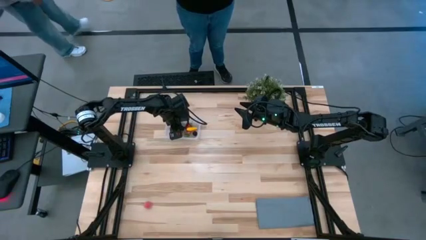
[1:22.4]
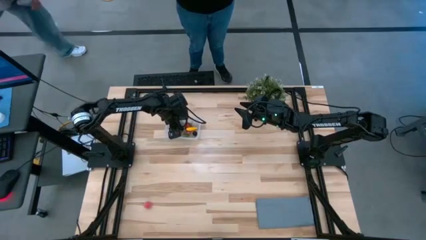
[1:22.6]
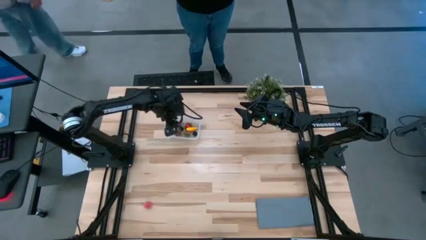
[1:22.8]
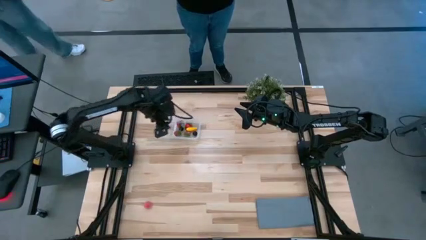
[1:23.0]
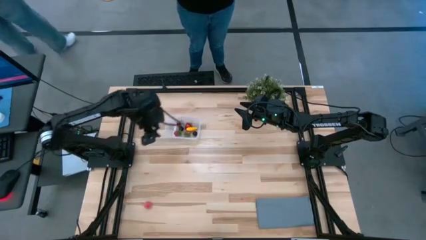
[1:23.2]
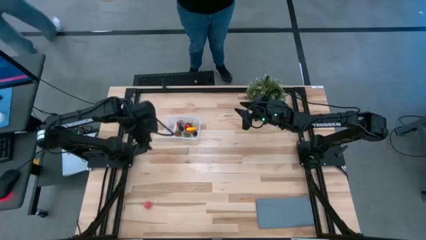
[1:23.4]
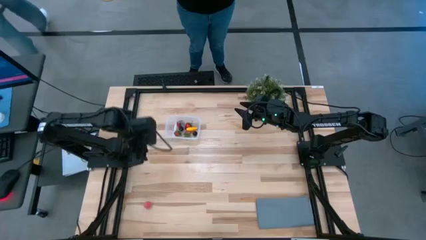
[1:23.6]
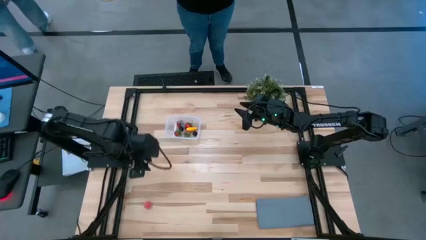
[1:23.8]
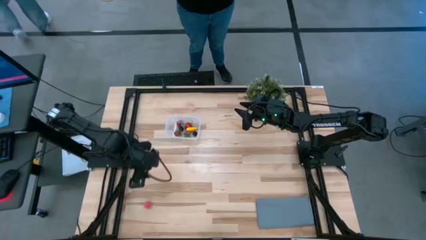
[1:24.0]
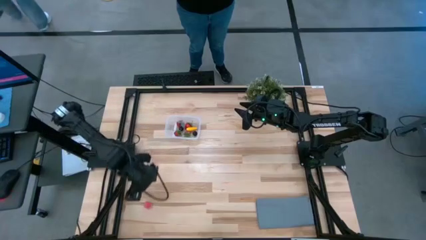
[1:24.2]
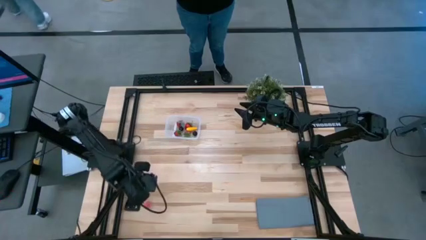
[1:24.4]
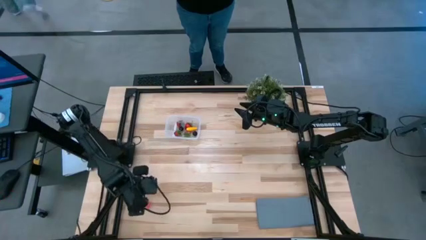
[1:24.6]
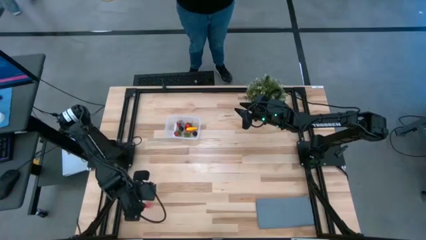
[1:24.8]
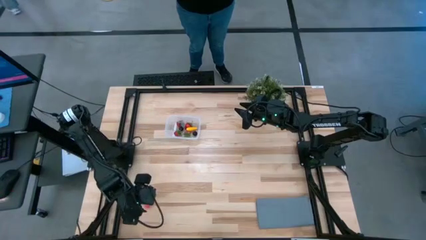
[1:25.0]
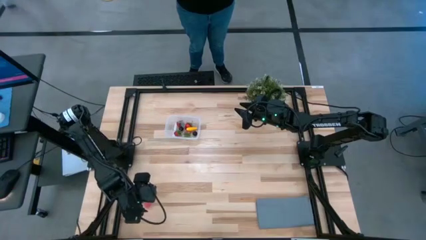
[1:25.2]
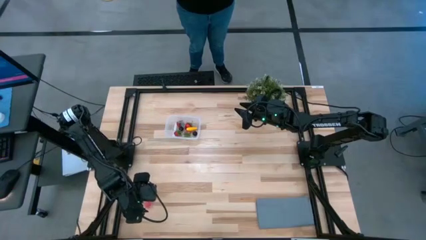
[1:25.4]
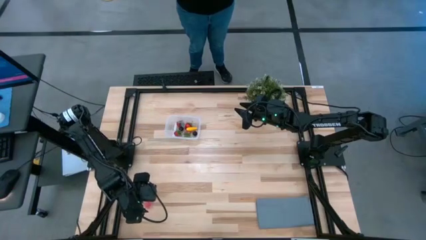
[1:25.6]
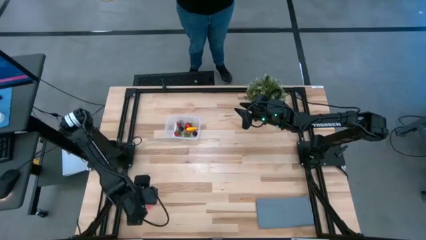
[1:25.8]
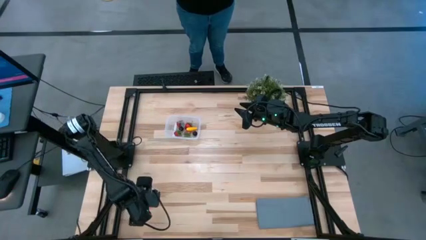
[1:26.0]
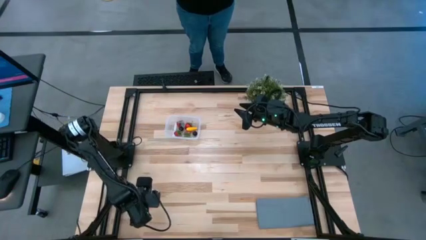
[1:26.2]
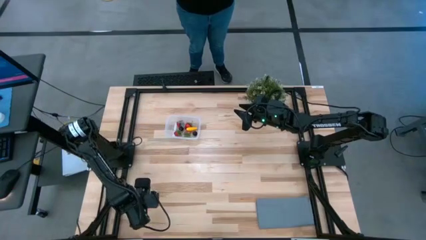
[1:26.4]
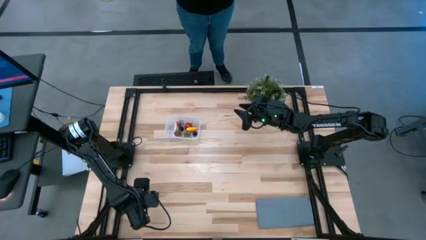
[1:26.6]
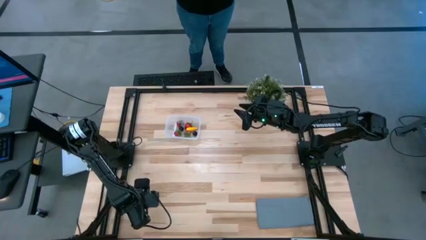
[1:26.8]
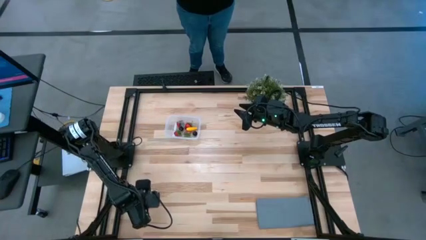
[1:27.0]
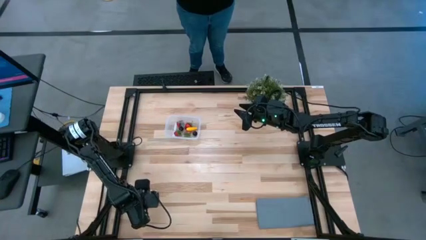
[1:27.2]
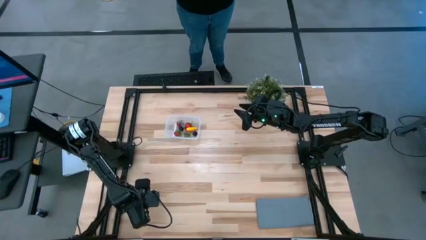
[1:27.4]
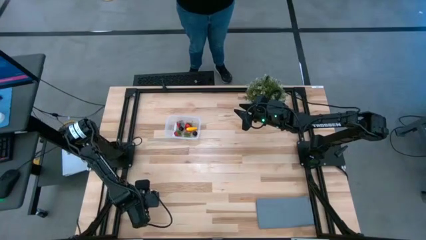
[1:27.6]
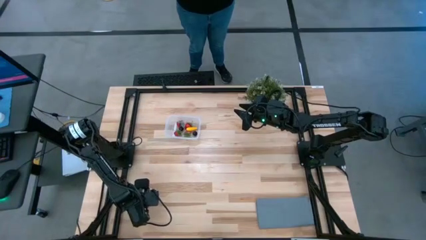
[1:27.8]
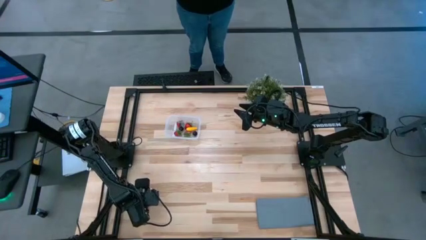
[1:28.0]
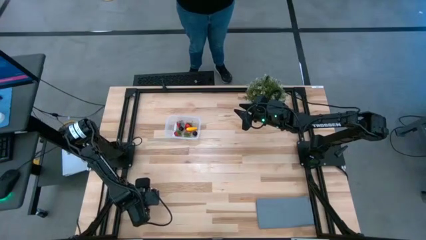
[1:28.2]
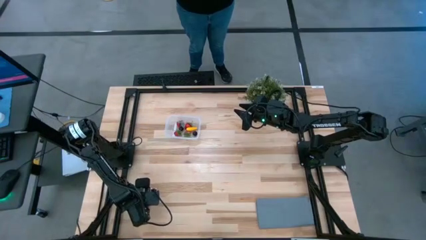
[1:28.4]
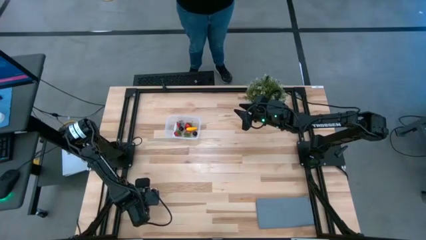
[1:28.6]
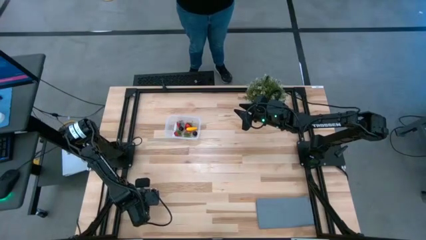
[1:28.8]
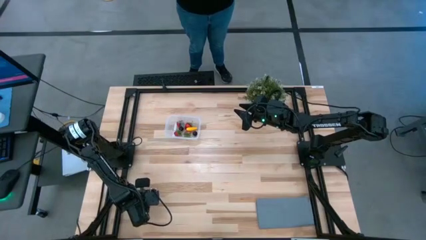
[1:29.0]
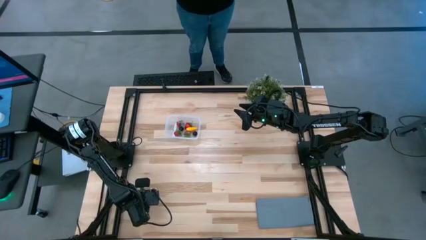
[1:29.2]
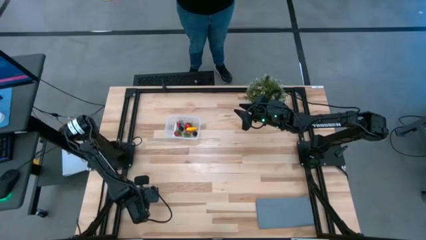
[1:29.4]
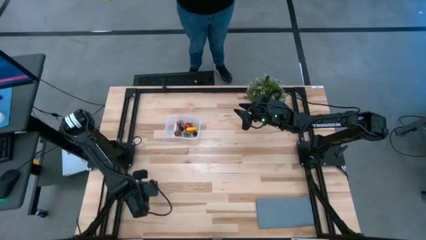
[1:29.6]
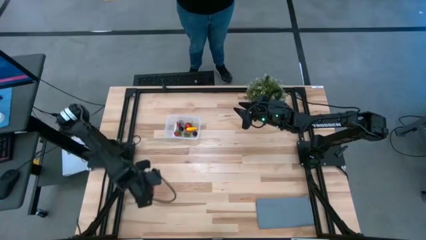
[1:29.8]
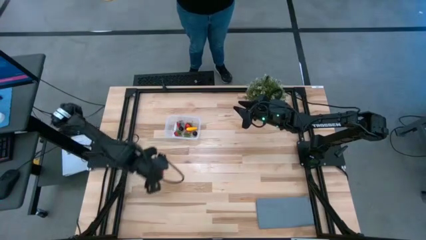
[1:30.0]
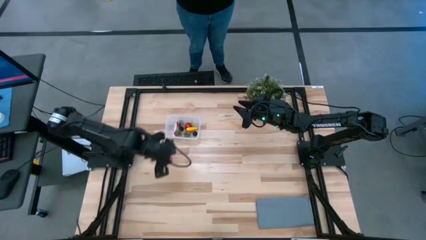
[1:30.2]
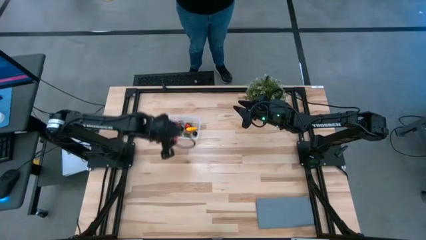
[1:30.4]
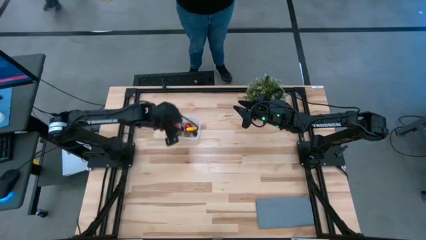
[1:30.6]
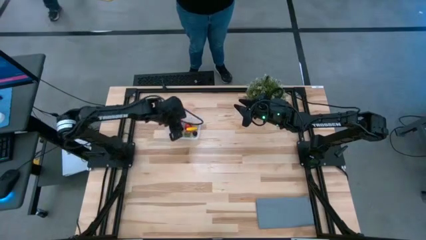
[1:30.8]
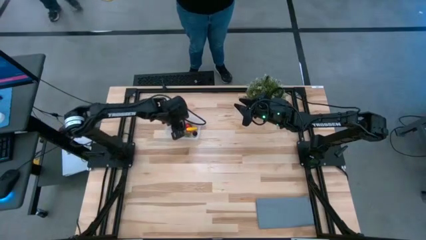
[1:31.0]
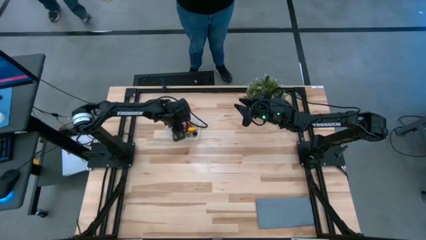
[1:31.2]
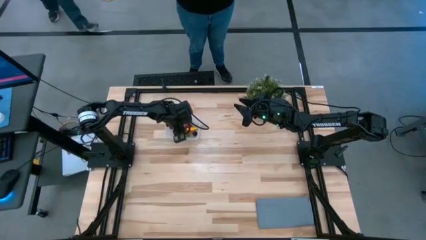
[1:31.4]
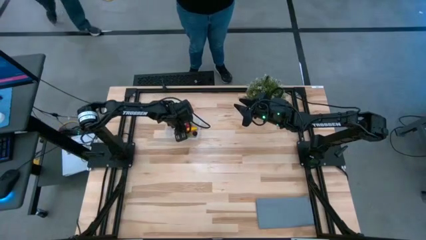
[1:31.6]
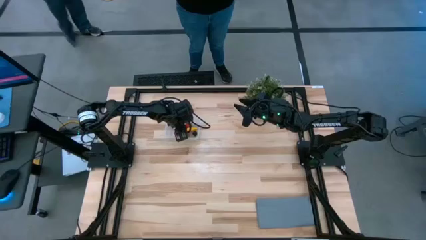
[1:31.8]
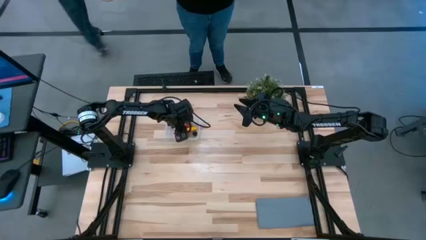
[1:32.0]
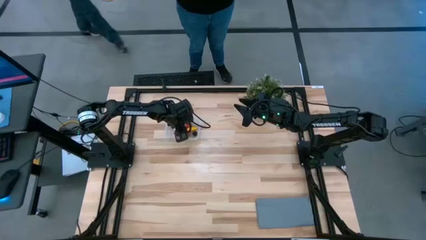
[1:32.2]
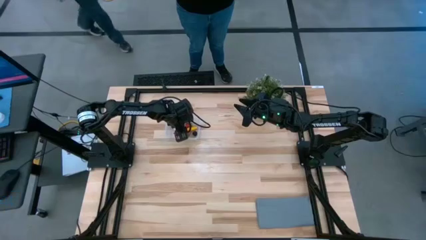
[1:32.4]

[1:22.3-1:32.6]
Task: Pick and placing Produce into tupperware
Put the apricot into the transparent bin

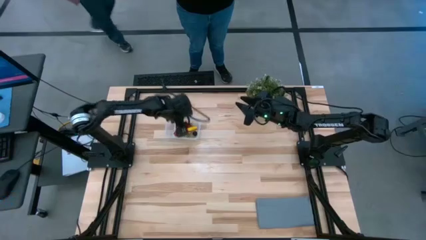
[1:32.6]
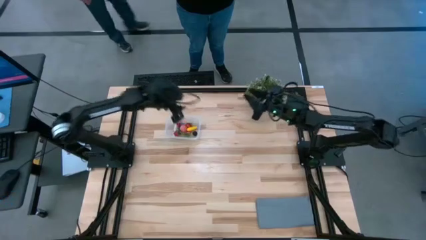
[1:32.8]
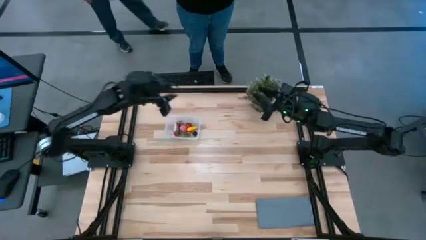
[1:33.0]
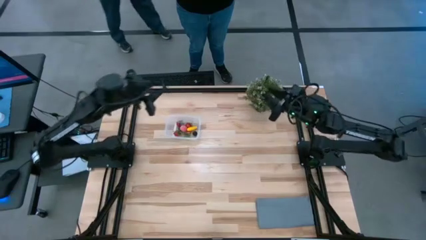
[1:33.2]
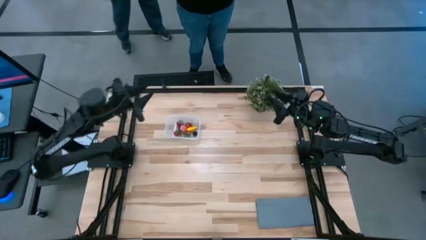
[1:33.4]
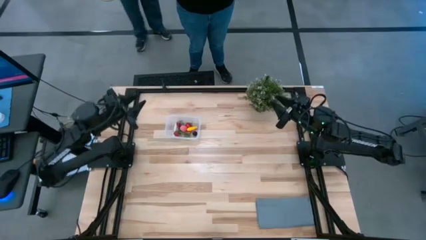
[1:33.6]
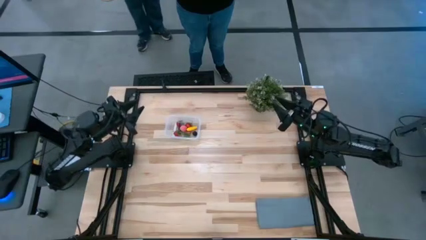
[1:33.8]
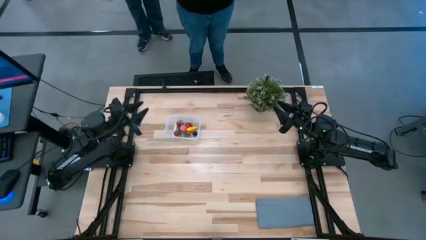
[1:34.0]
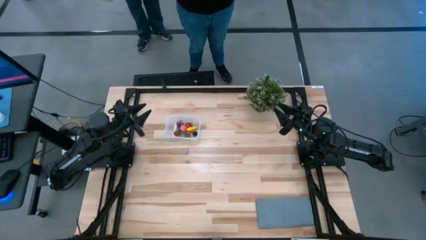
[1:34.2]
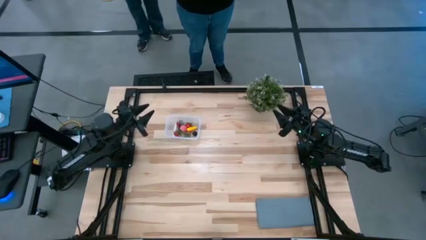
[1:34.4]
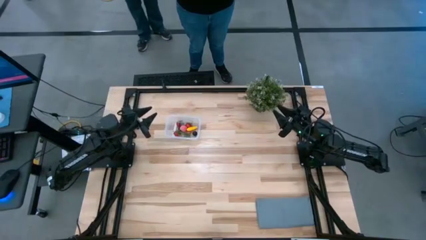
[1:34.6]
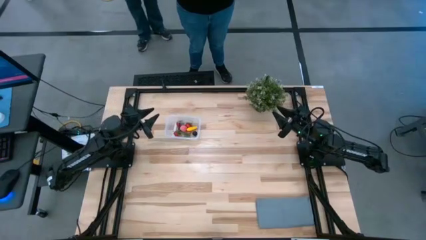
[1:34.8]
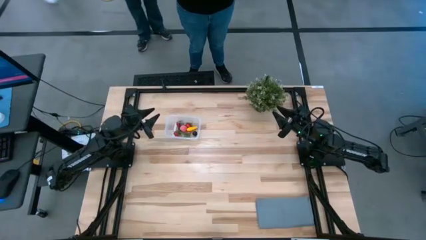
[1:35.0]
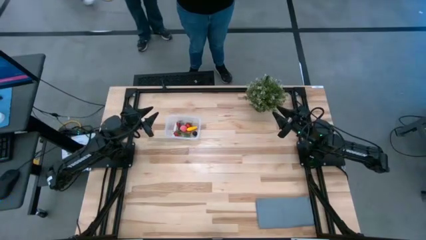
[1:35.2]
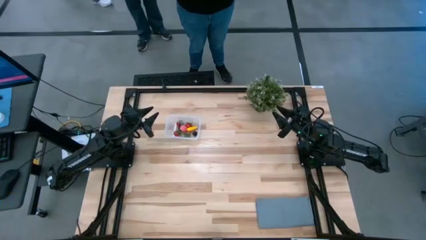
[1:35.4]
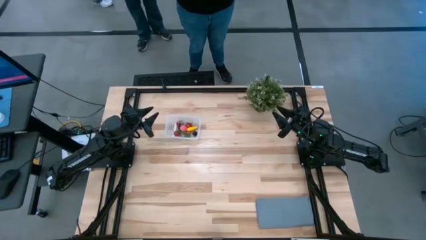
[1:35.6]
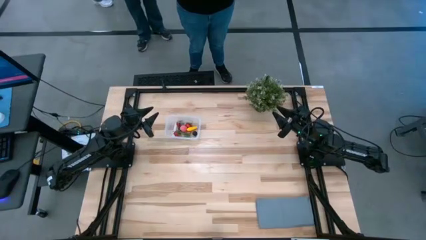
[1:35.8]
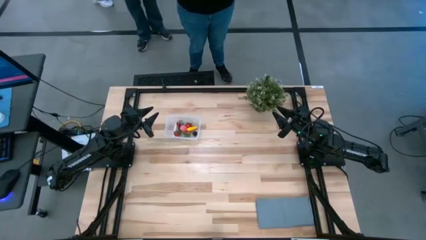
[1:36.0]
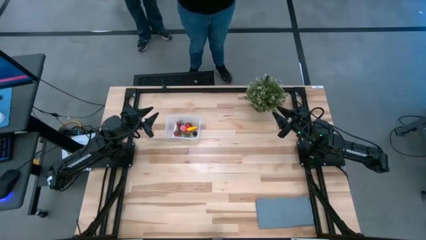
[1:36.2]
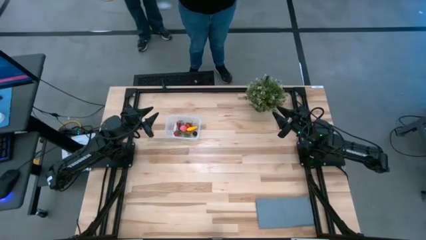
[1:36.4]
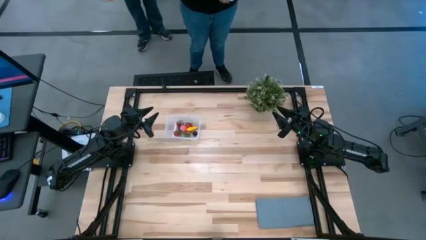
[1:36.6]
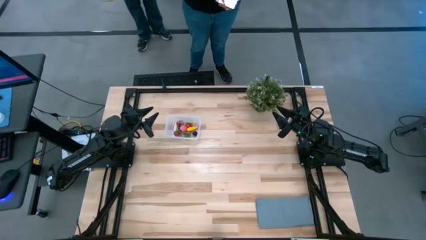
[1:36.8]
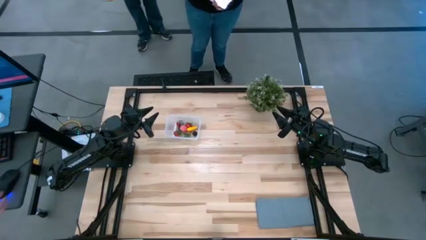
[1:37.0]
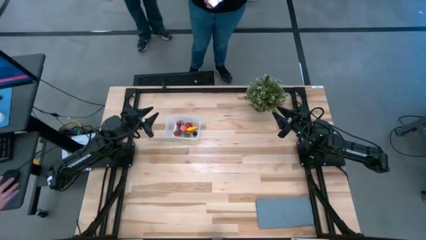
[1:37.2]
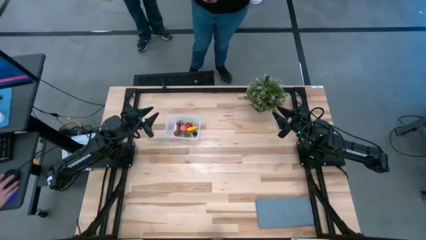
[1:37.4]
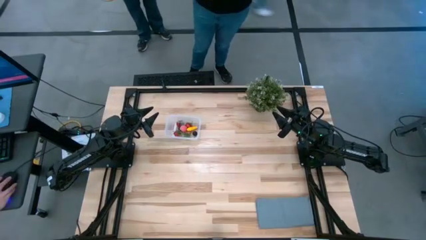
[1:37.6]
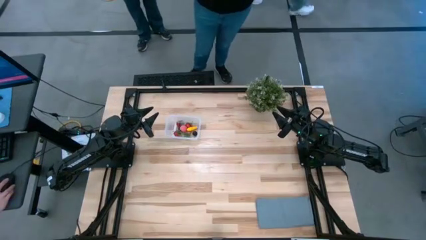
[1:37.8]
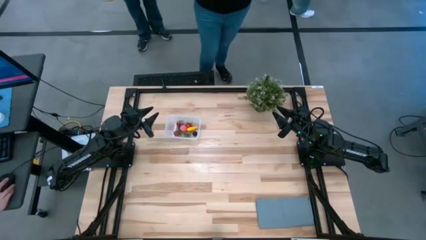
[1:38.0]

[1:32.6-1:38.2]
Return to Home Position
